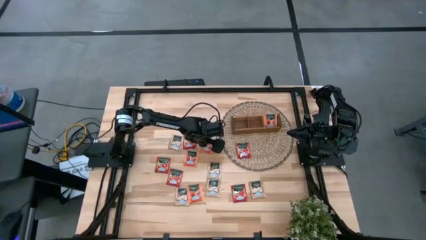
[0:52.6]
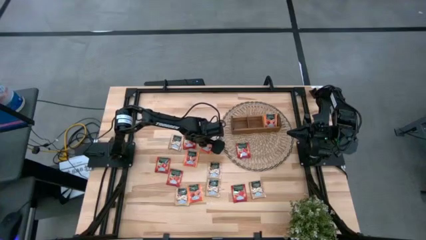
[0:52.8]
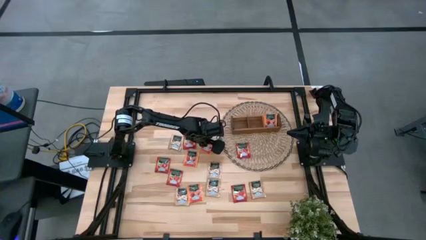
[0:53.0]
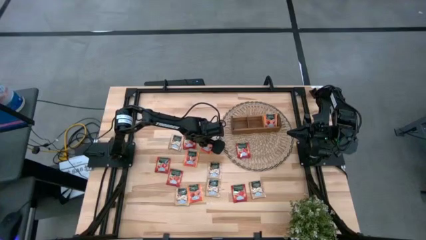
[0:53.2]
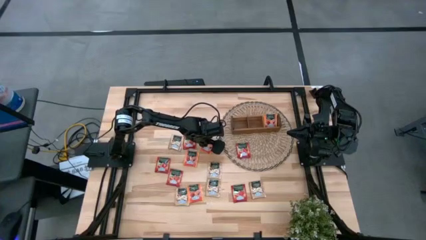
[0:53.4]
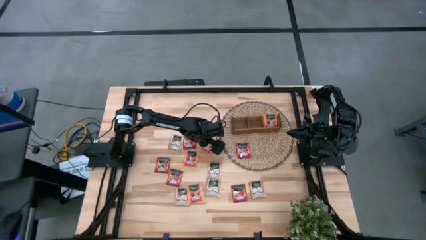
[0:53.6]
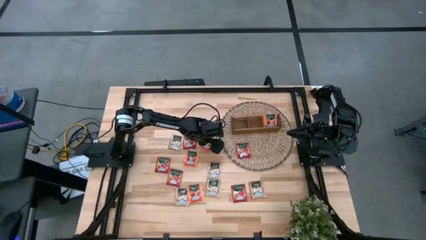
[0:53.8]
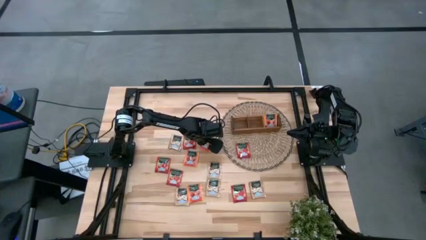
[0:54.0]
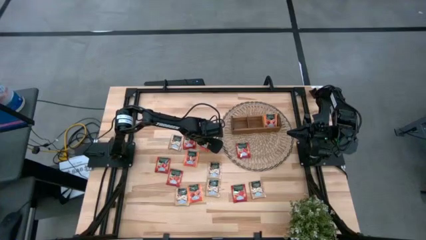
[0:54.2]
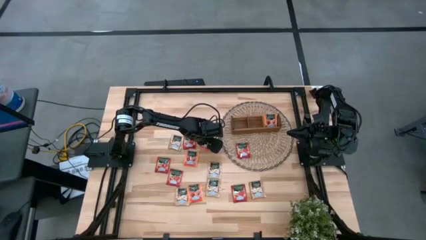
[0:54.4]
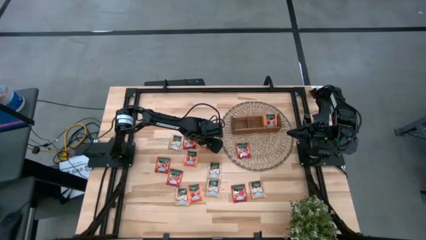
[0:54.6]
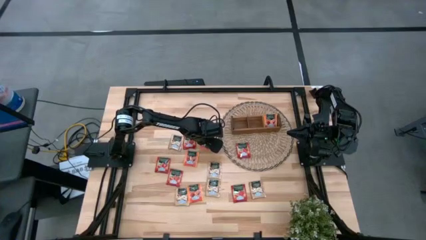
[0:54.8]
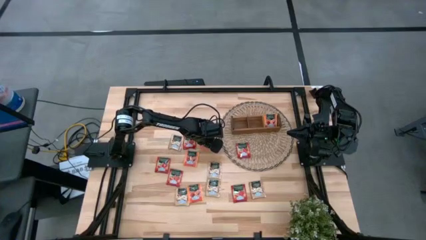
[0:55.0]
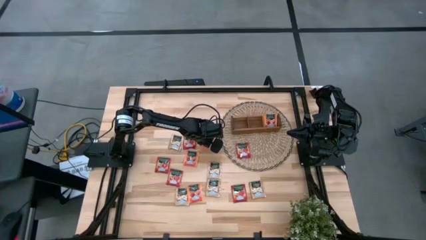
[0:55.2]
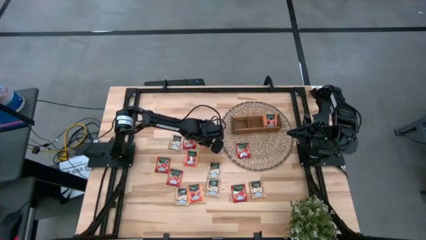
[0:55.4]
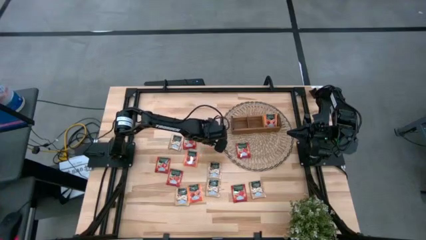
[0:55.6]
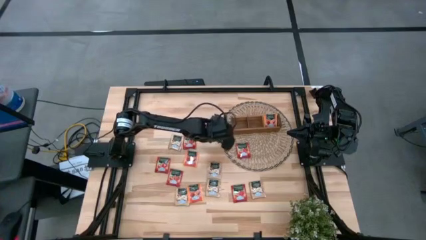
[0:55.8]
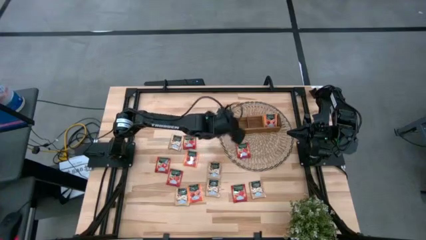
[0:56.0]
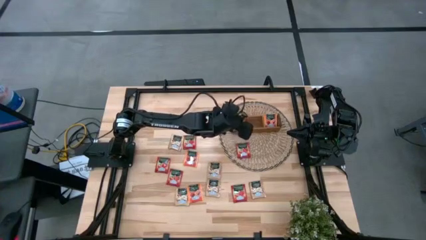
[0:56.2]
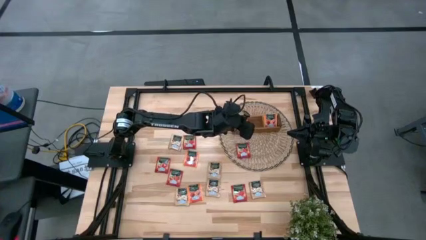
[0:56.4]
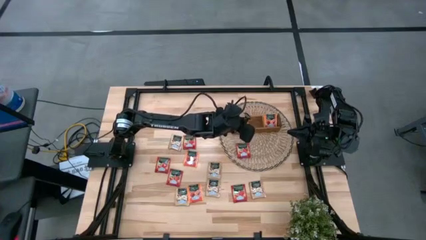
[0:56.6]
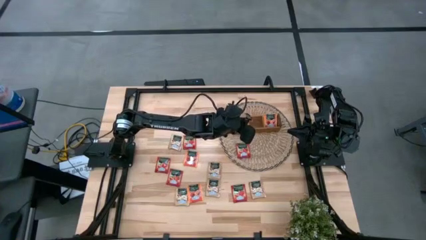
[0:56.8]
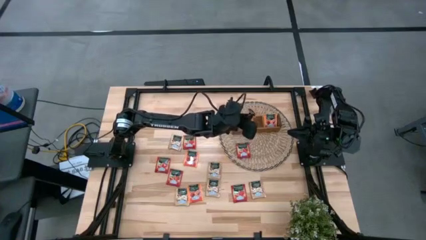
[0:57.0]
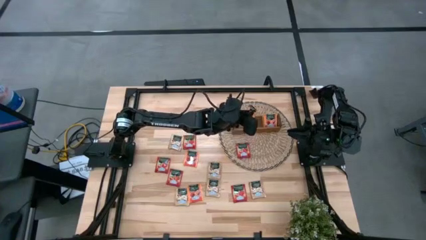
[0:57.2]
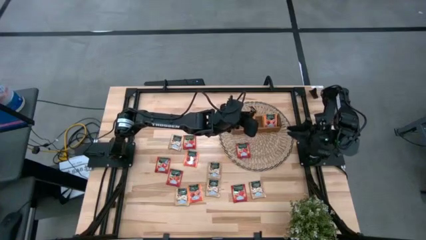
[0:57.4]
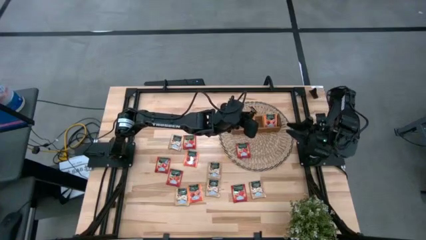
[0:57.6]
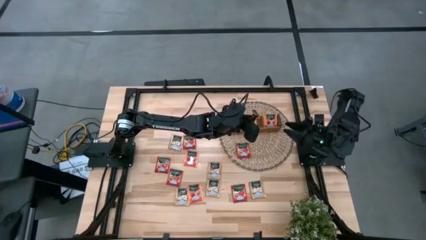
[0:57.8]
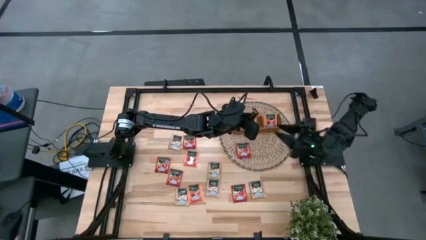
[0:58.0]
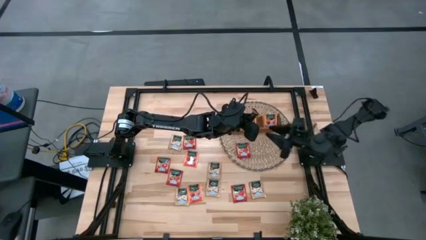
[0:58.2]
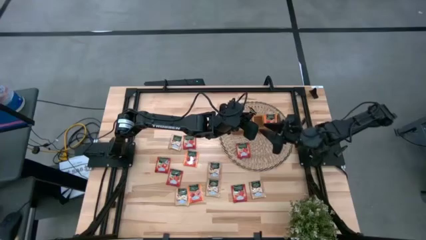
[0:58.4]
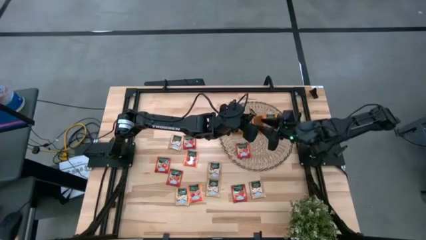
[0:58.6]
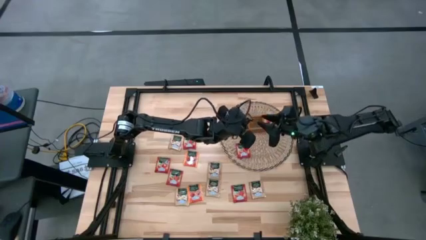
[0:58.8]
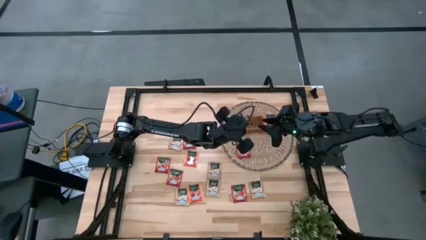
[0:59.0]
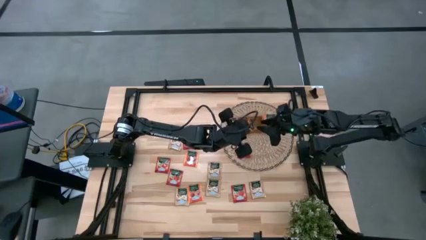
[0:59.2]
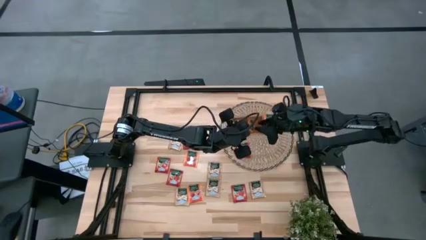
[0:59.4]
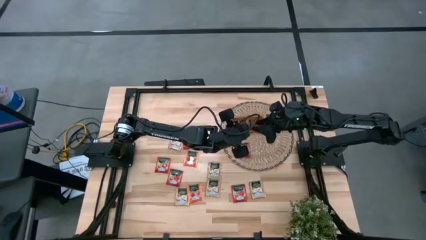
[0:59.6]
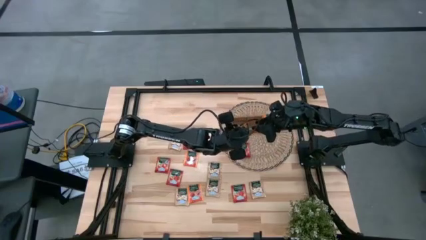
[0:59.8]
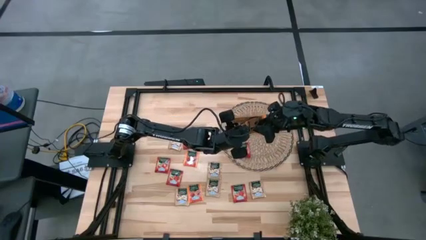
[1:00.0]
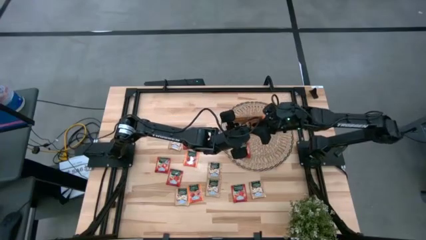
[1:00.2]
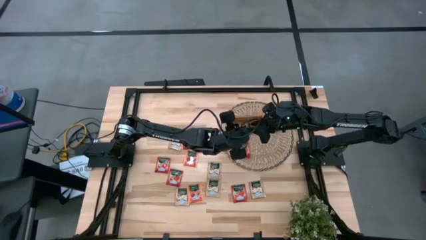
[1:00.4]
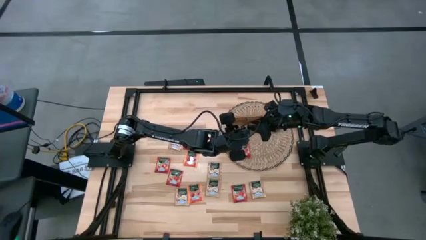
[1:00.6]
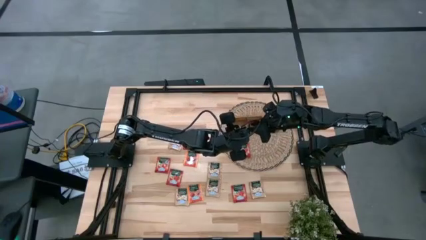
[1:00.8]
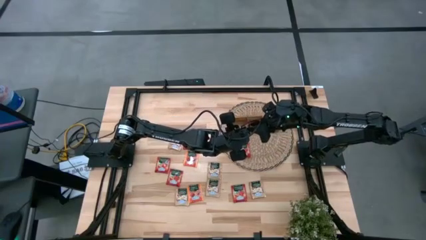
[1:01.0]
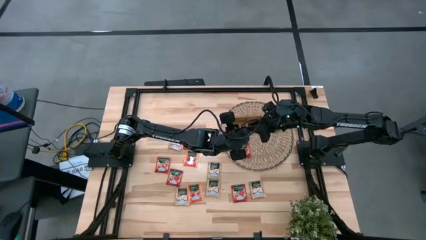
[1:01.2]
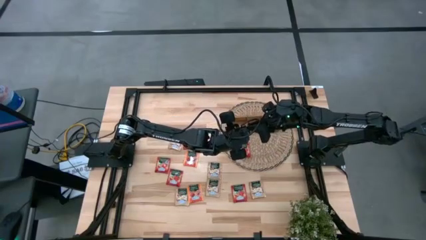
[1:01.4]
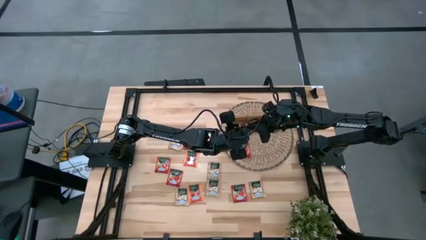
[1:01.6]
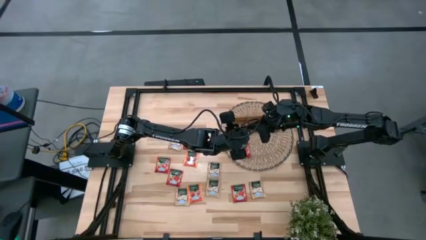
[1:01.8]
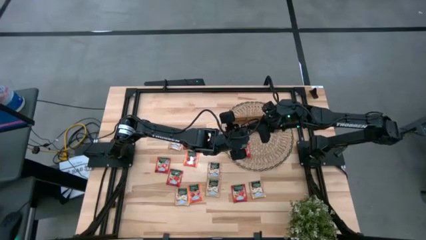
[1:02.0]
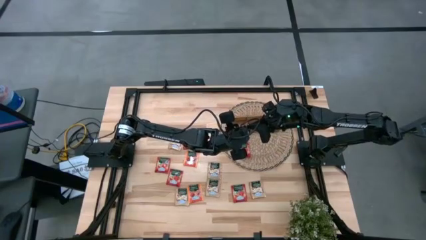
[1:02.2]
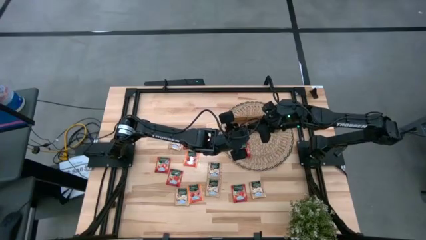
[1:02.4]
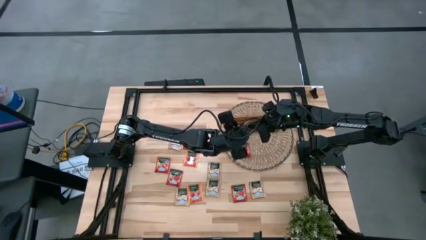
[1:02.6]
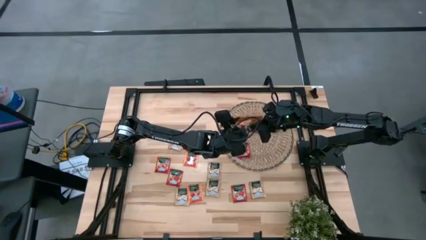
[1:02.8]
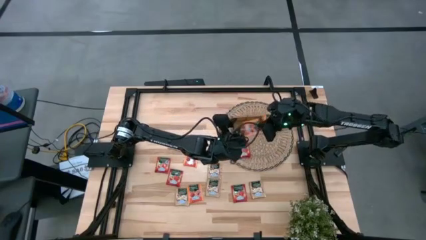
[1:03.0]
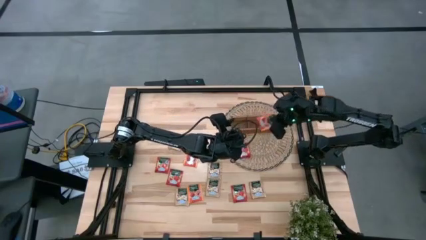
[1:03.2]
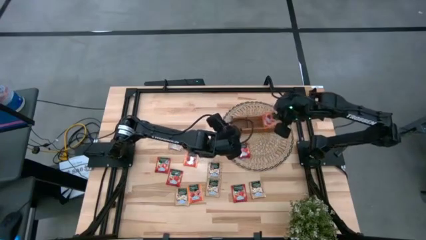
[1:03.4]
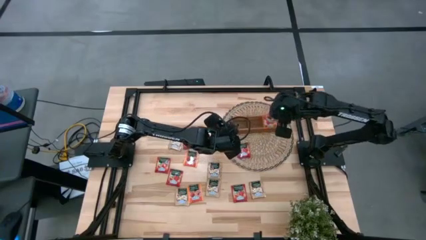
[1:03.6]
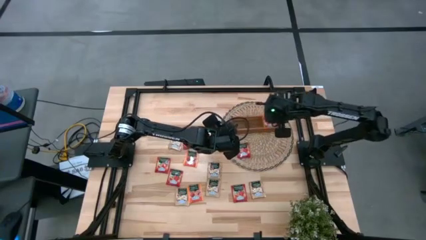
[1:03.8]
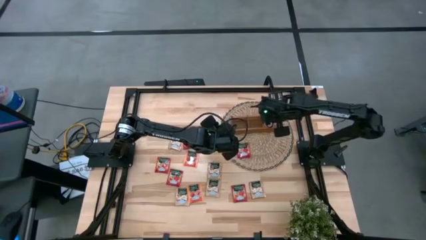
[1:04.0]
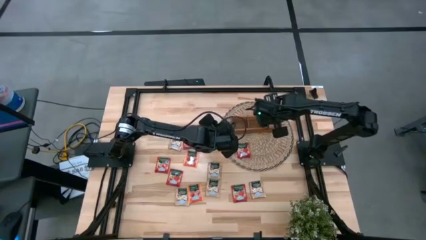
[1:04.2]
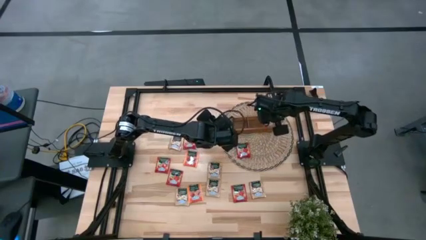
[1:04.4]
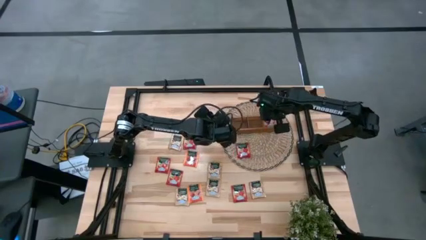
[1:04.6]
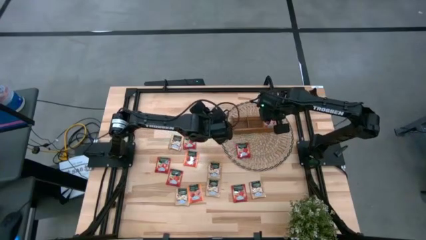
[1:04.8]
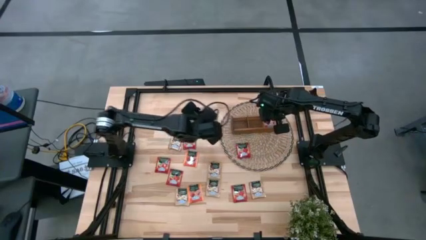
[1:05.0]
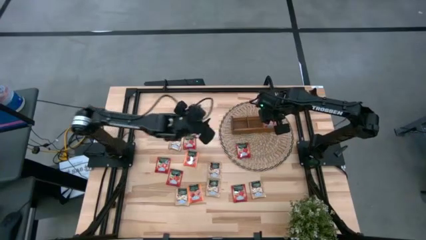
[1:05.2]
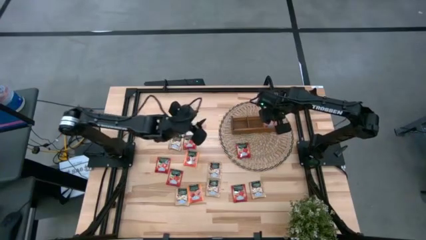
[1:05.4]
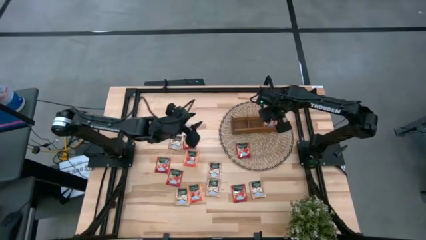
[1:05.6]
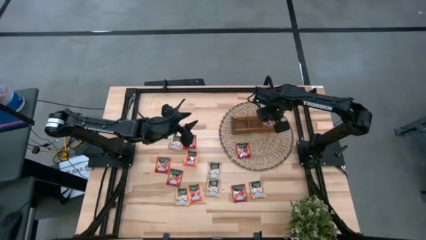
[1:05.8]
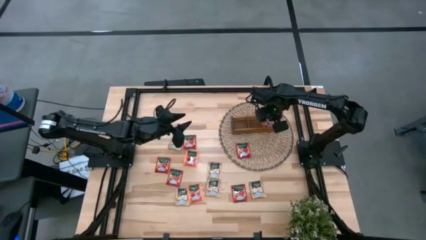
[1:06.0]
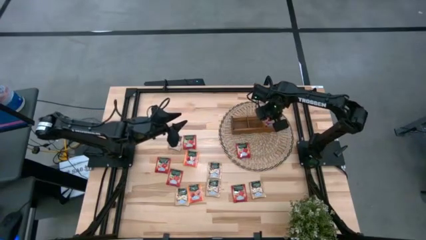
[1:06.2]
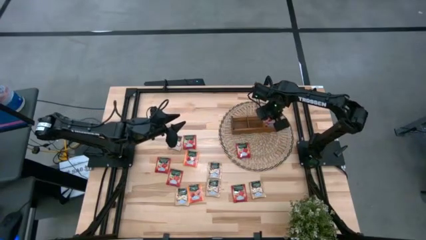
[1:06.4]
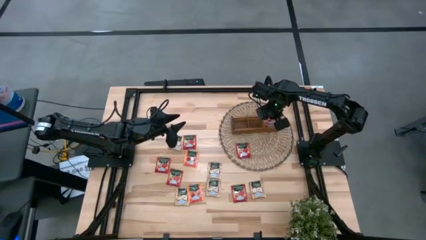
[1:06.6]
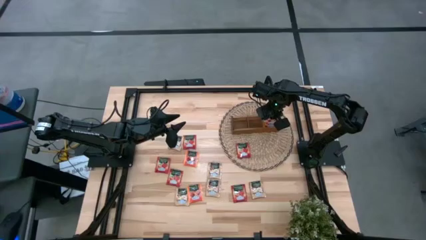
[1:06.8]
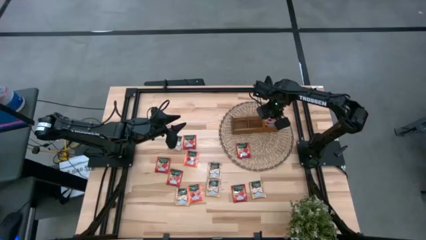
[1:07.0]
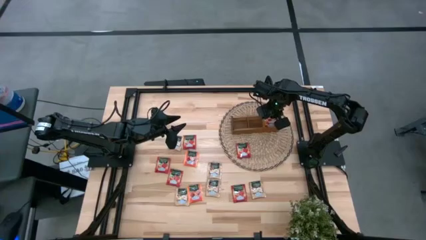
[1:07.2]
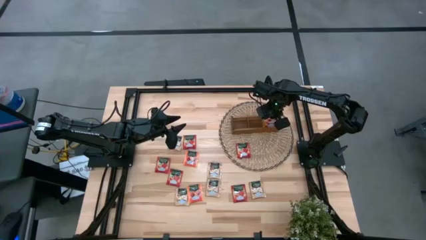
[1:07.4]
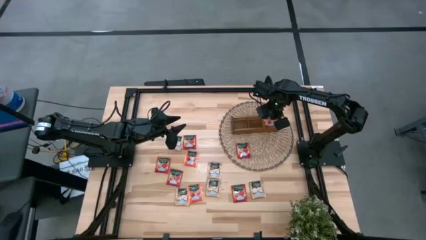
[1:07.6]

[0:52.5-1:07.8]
Task: Pick & Place Tea
Put the orange tea pack into the right compartment of the brown organizer
